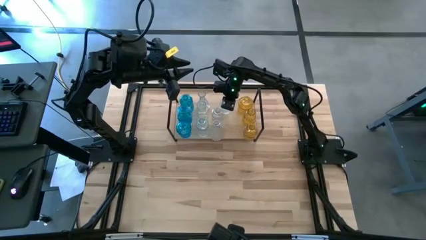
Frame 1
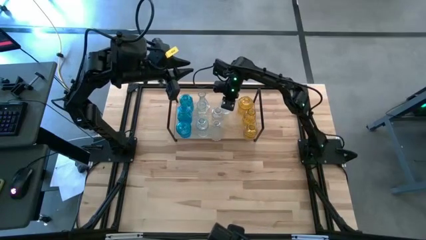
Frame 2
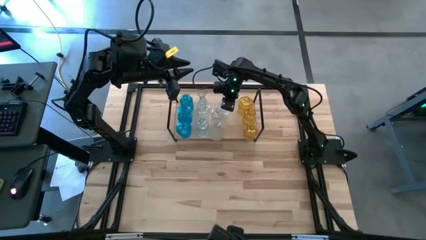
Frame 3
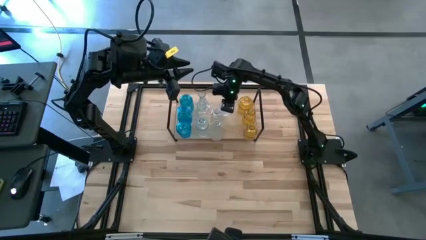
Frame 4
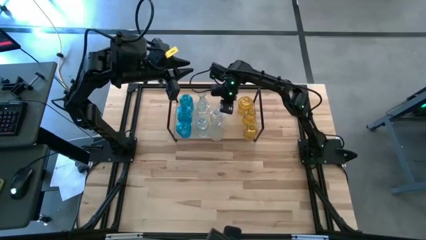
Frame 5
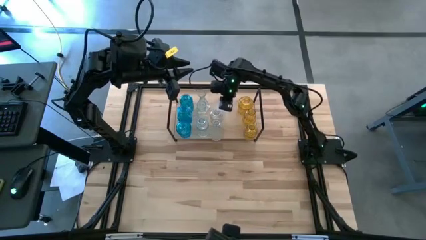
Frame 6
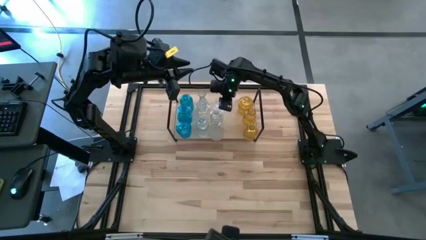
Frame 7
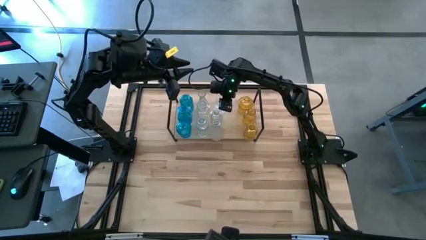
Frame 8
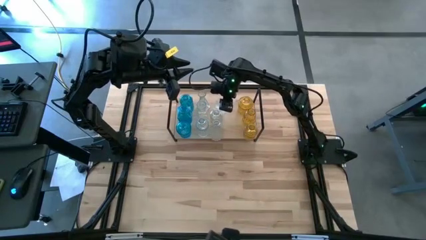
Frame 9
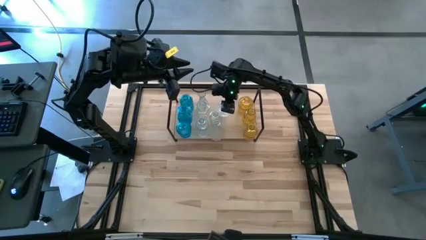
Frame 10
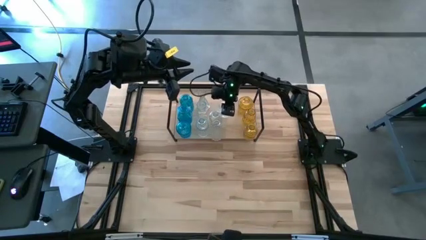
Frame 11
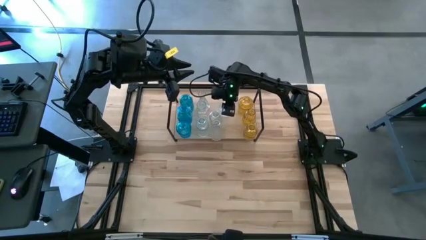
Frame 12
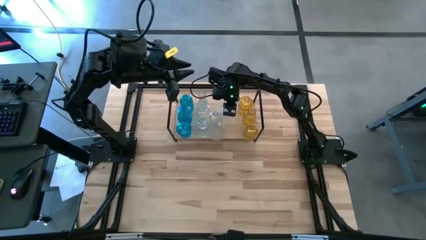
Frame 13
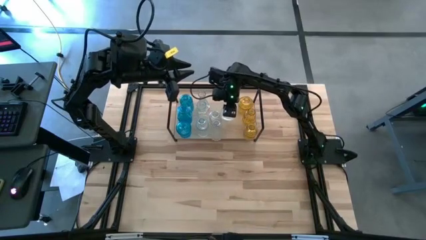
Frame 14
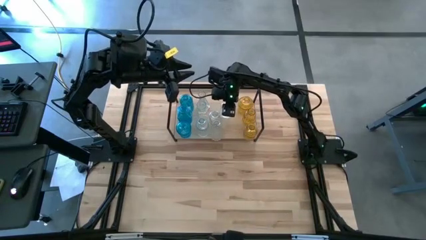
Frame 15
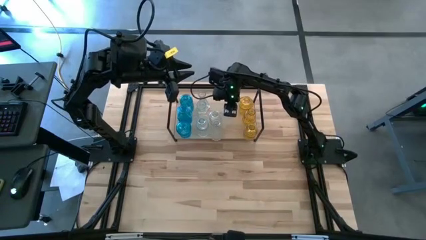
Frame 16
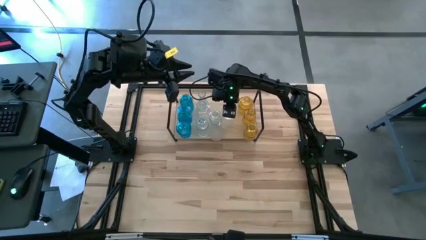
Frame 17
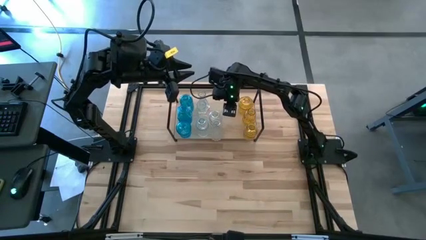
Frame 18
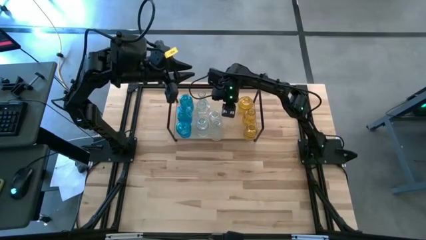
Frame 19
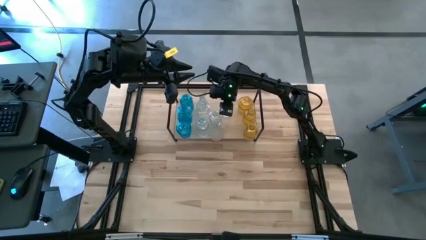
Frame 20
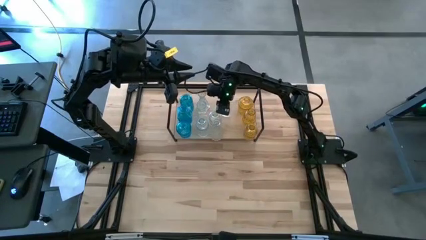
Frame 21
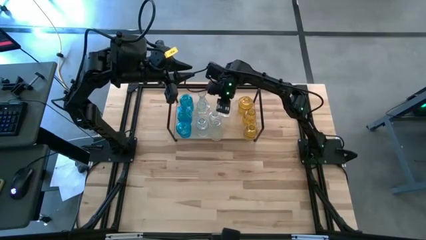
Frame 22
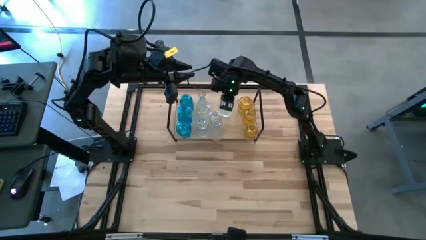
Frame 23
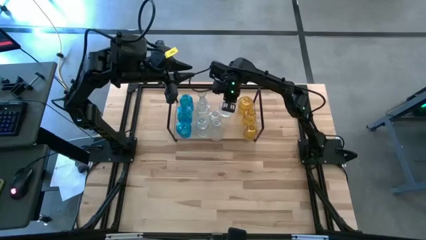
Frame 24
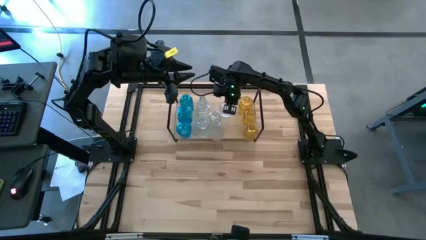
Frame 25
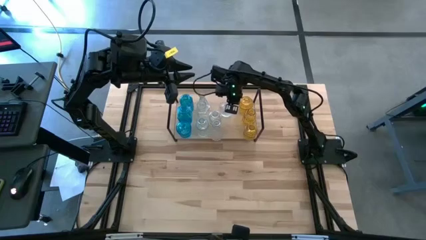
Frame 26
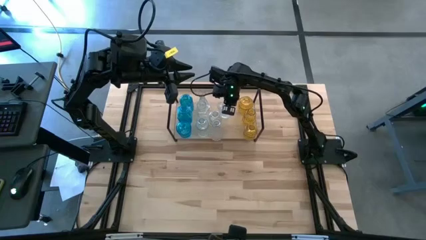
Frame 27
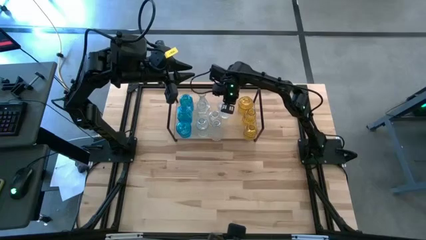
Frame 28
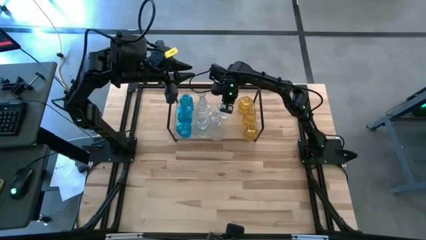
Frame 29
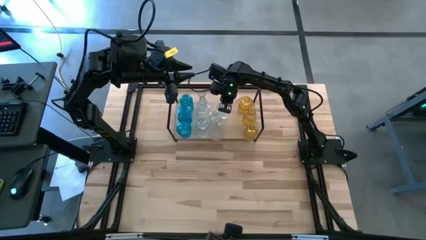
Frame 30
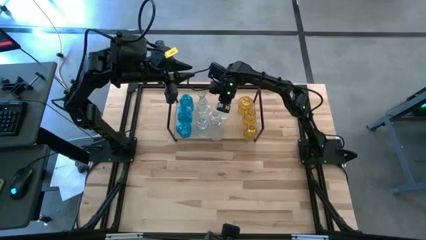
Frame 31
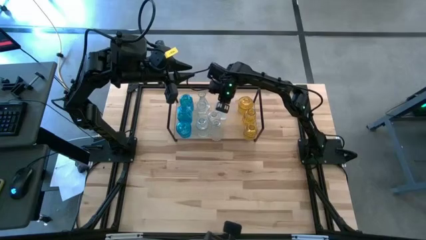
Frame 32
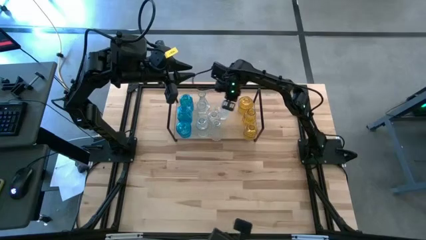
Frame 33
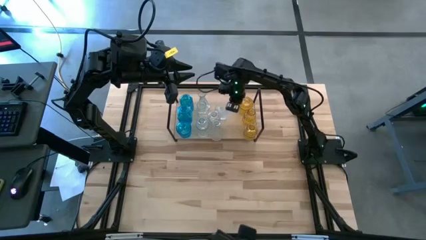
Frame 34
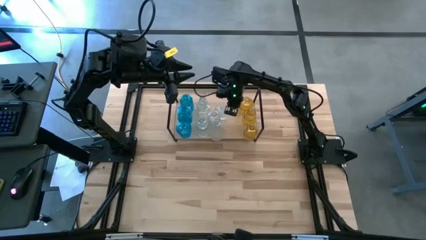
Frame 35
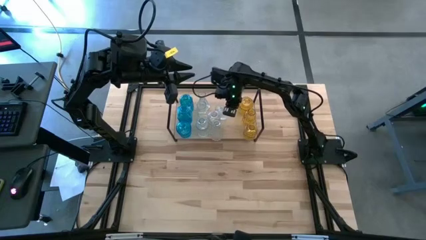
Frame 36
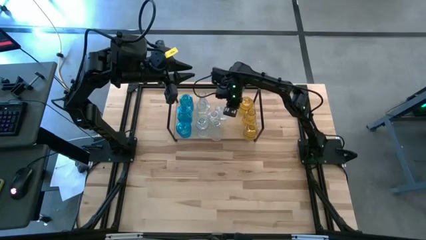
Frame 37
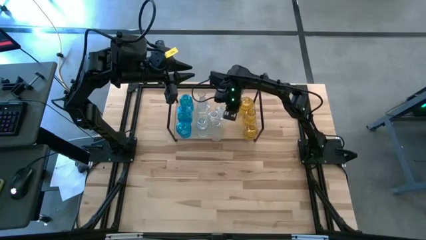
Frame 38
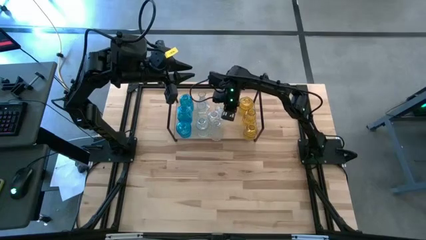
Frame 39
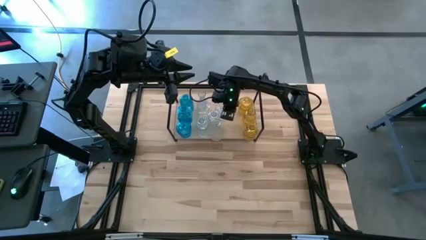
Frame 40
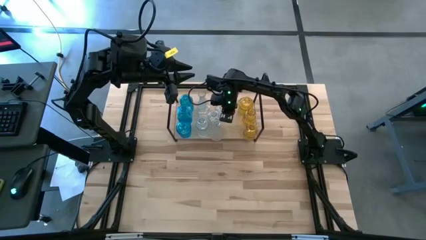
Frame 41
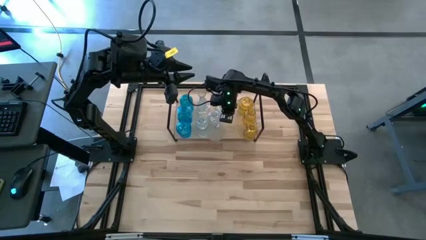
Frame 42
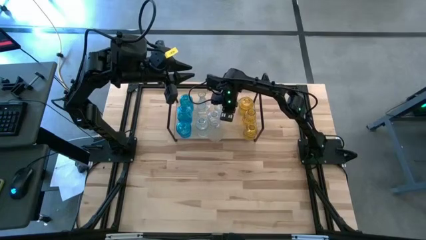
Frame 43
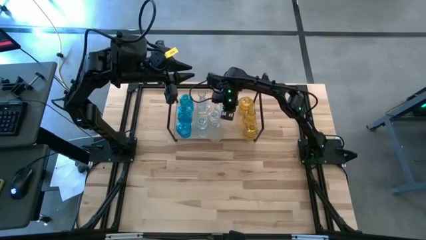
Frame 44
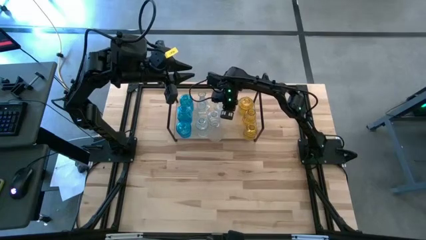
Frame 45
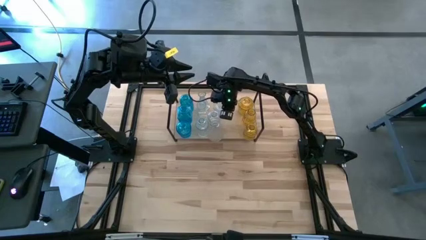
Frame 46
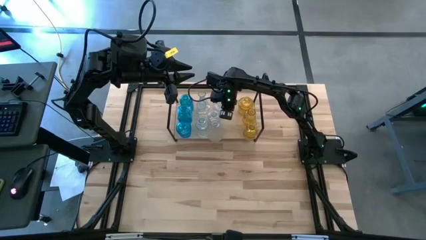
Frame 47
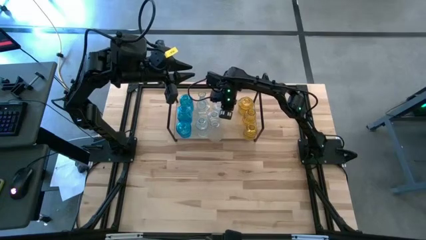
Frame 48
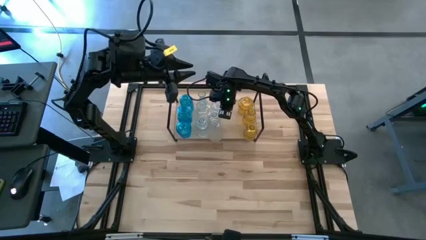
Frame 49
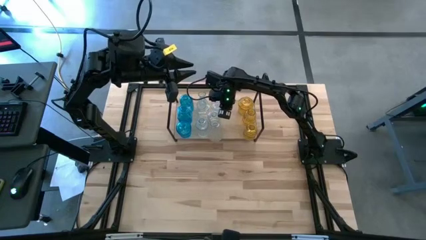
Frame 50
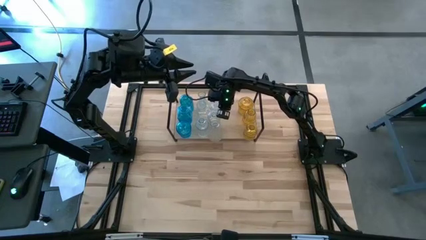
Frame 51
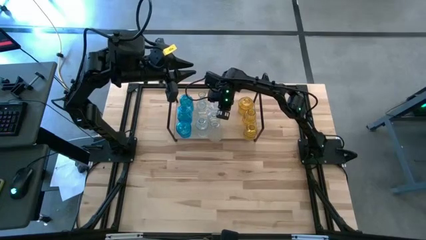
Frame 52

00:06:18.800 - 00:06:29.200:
Task: sort vases onto shelf
Put the transparent vase on the shelf aligned with the other transparent vases

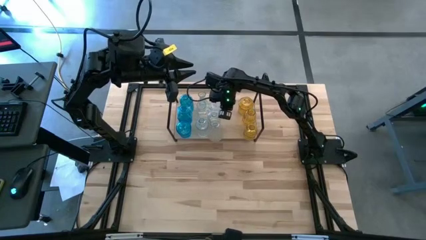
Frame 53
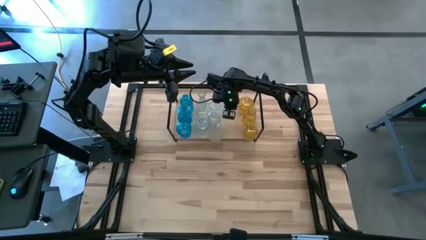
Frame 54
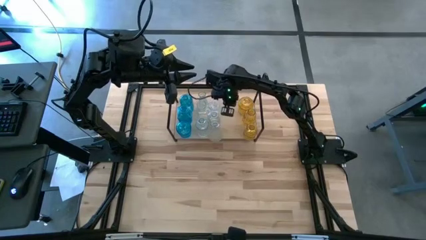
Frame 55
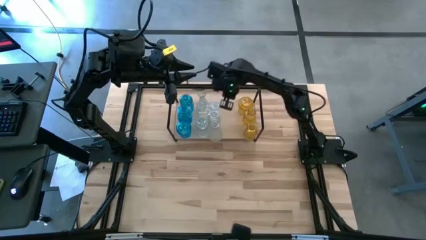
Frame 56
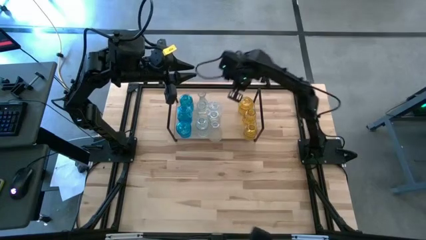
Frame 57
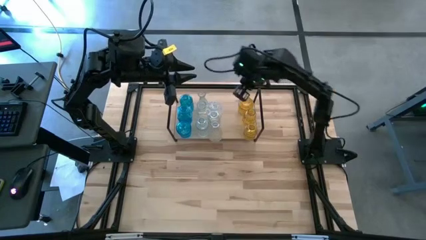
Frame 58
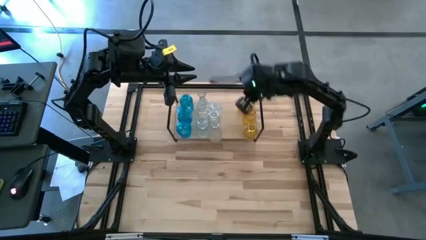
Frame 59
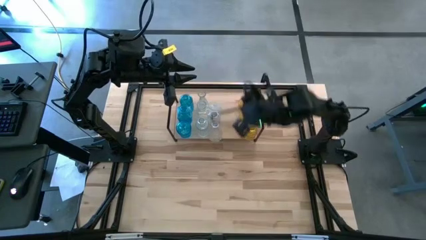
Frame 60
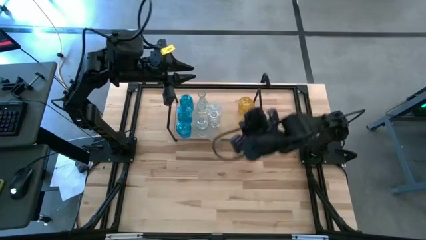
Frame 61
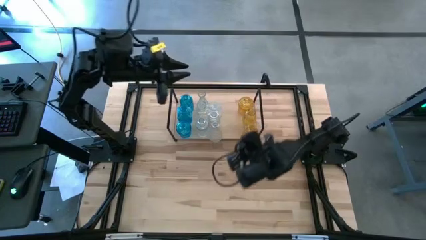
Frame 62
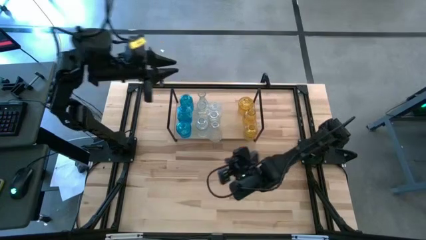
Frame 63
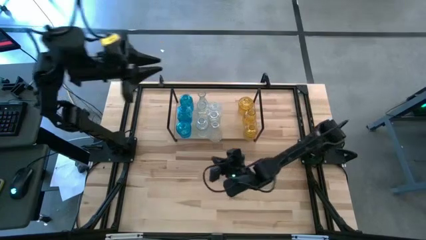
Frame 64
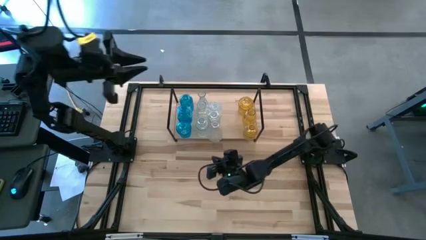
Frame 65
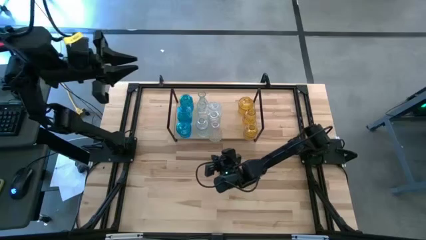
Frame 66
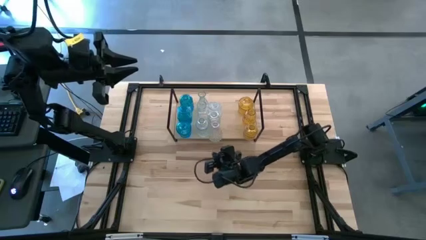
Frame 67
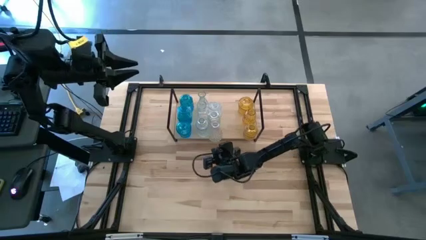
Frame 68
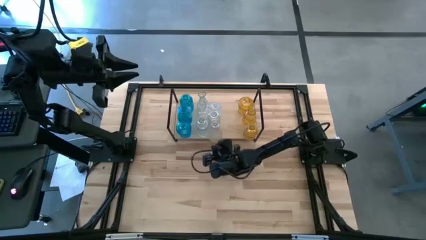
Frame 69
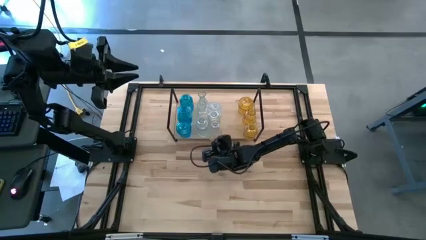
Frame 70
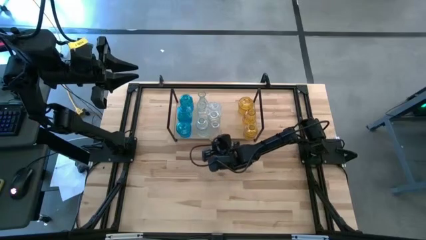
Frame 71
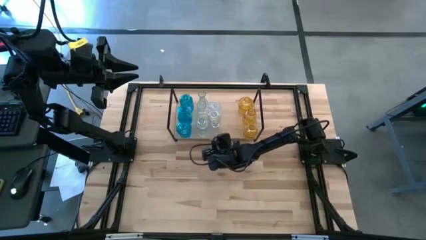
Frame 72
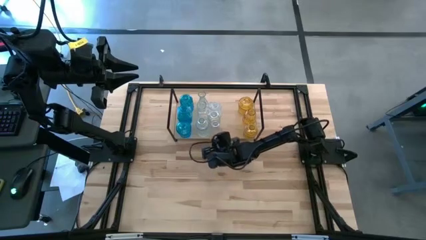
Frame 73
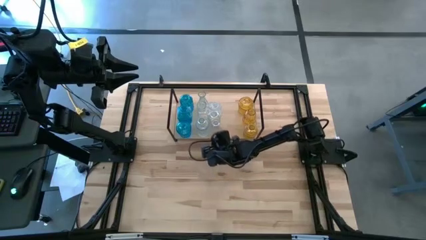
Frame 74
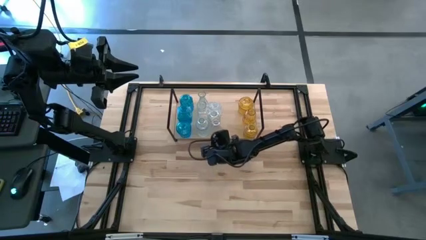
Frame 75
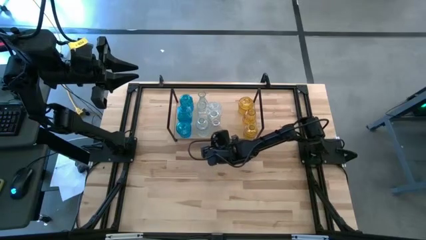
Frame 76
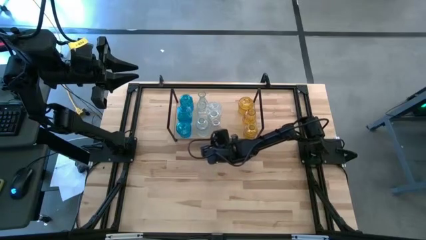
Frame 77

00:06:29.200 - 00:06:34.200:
Adjust the transparent vase on the shelf
